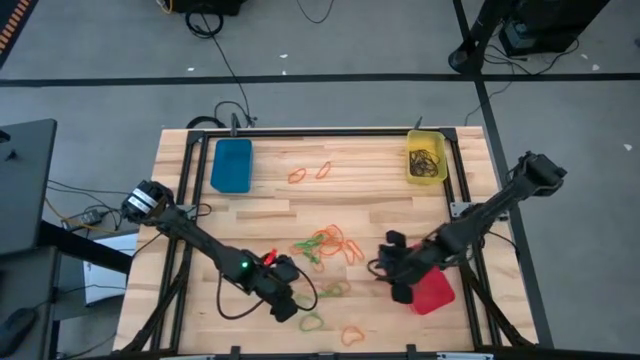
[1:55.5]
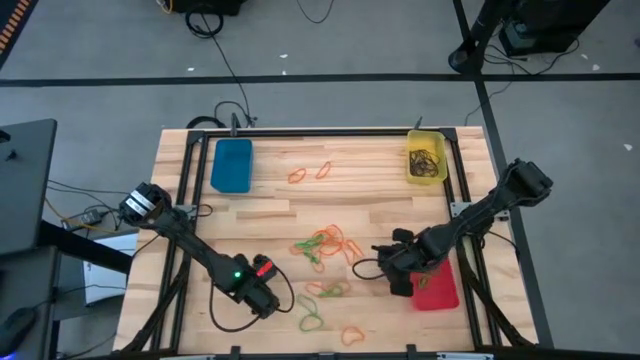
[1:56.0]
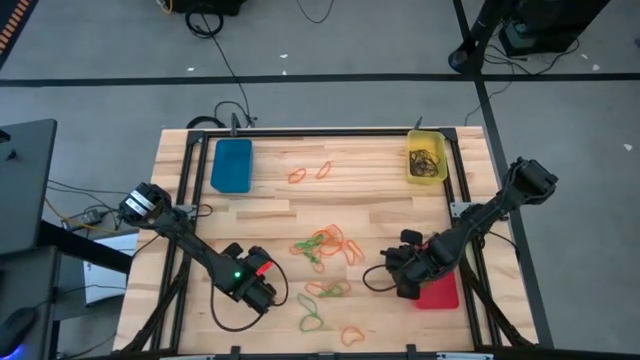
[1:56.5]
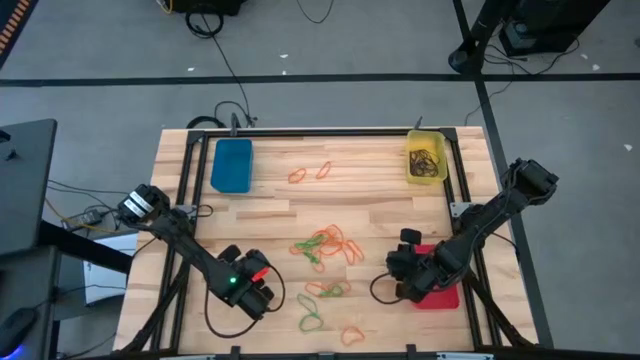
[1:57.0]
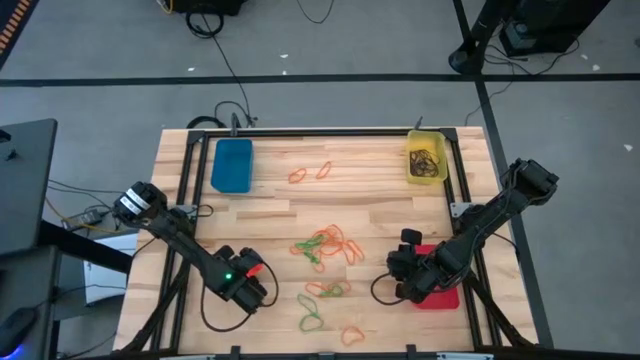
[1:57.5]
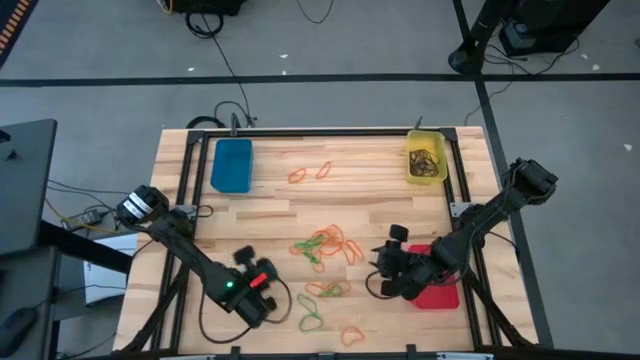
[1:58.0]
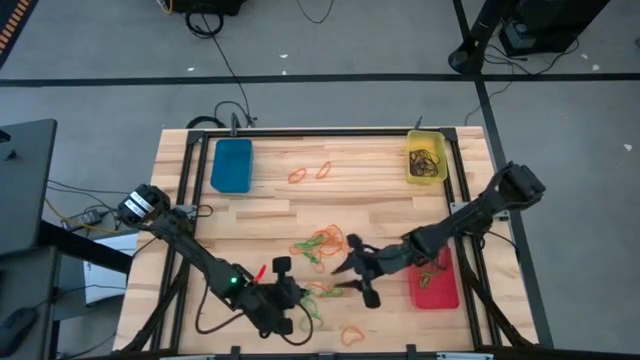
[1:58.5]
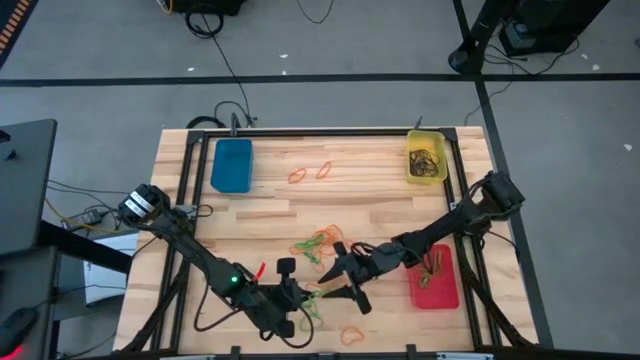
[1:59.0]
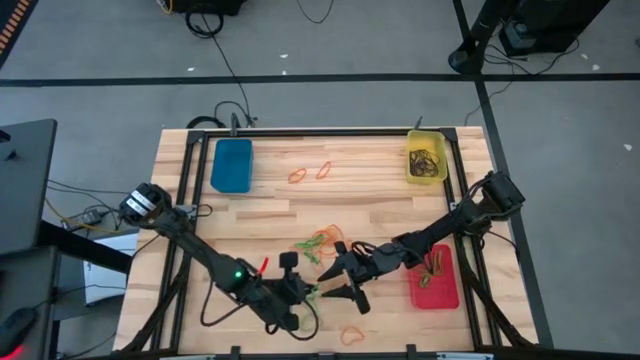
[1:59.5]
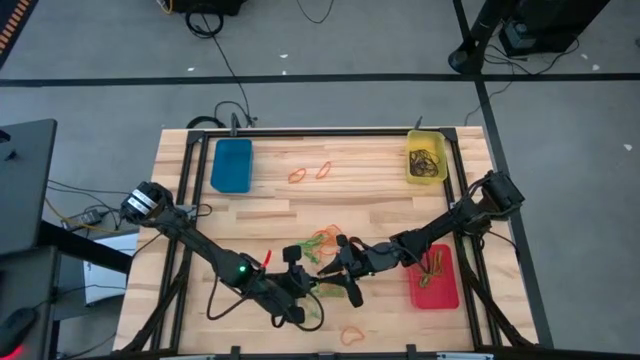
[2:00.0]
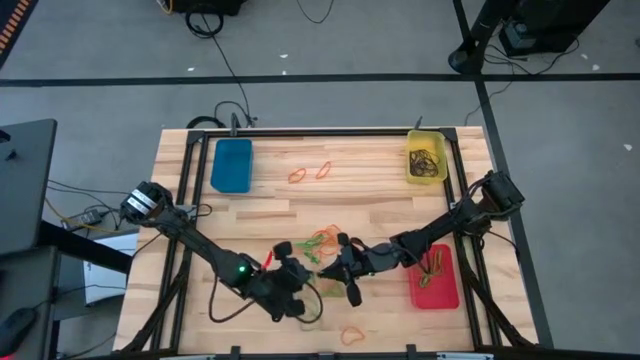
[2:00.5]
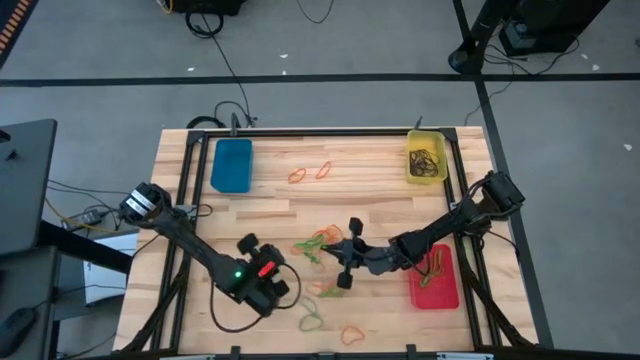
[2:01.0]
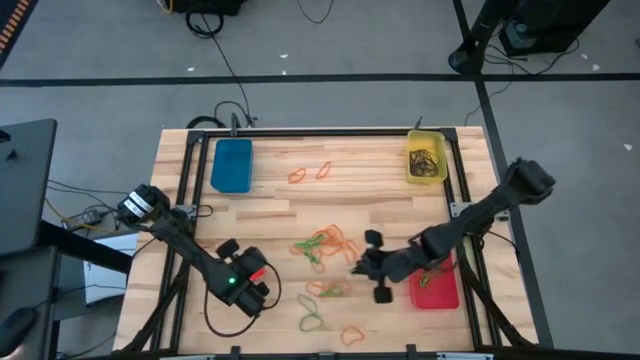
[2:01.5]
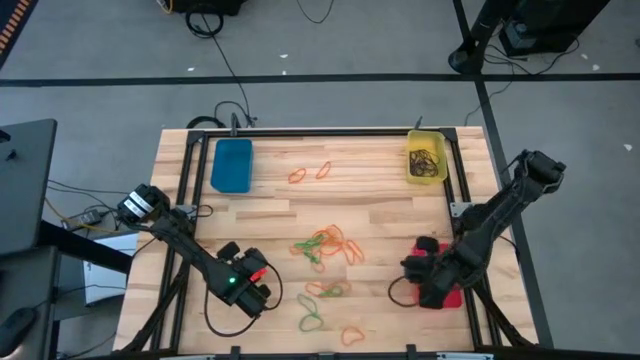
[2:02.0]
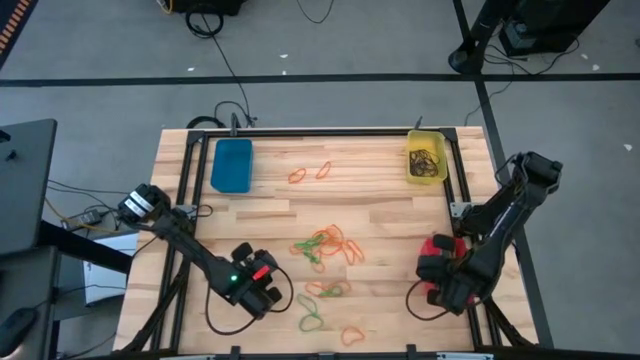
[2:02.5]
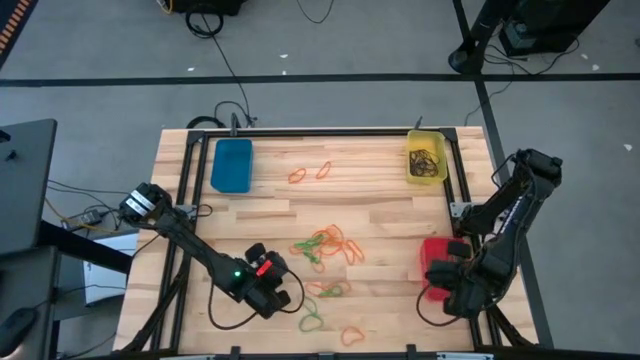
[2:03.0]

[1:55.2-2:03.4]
Task: Sort rubber bands into baskets
Put the green rubber band into the red bin

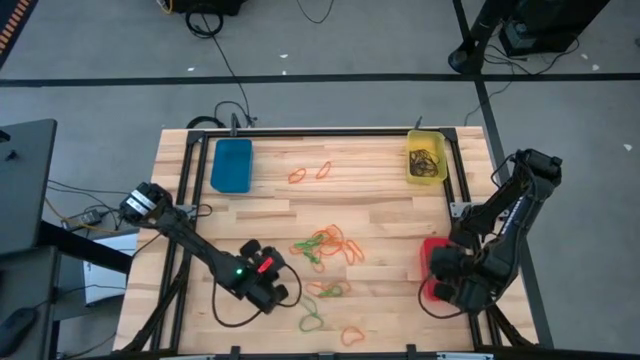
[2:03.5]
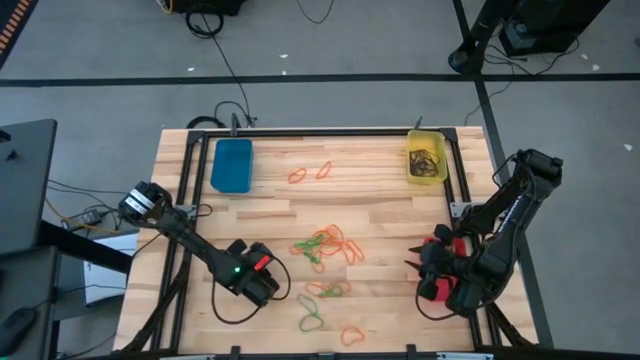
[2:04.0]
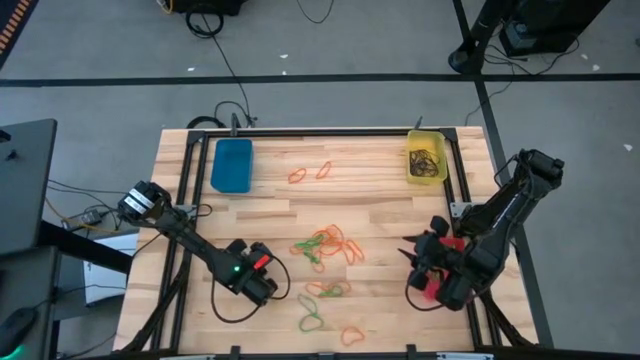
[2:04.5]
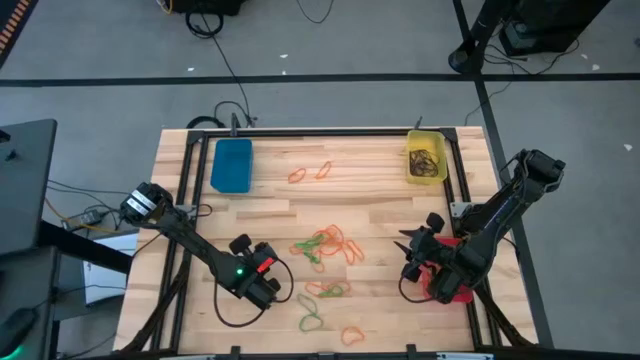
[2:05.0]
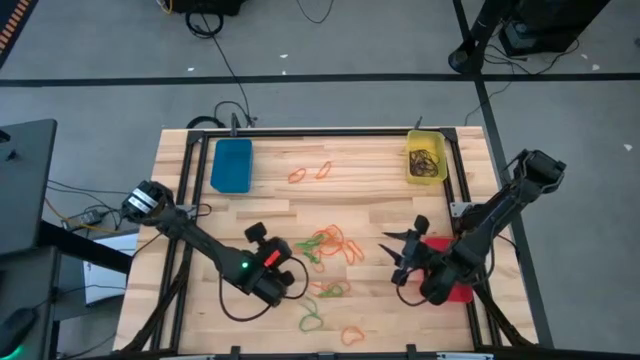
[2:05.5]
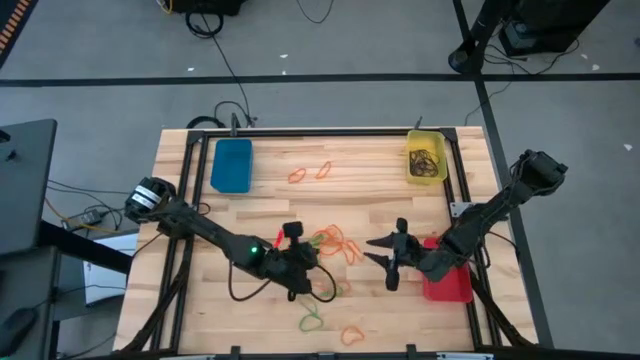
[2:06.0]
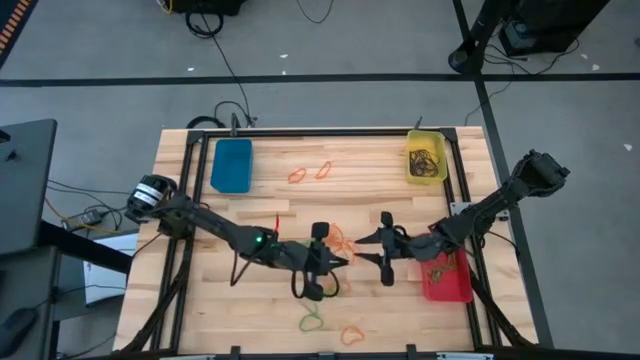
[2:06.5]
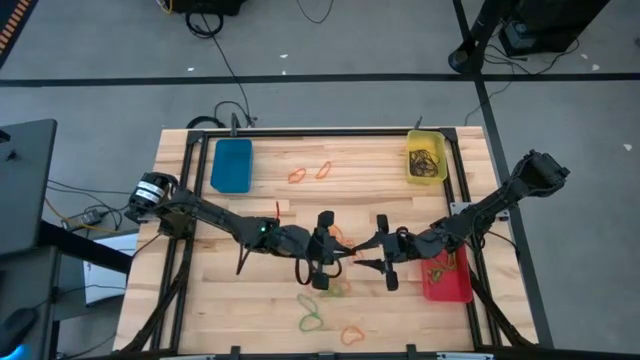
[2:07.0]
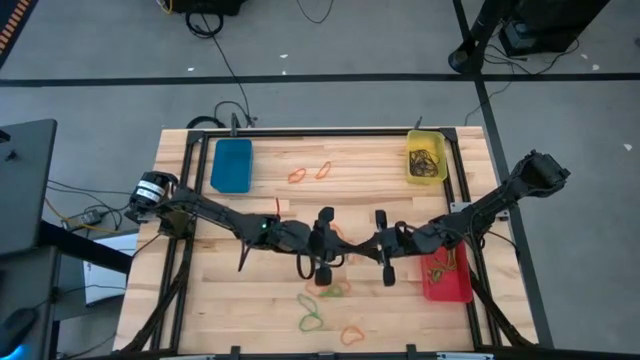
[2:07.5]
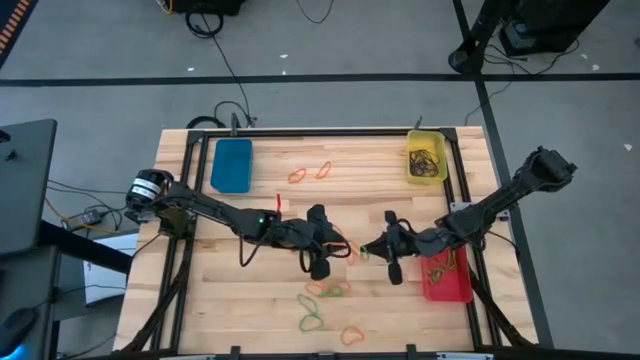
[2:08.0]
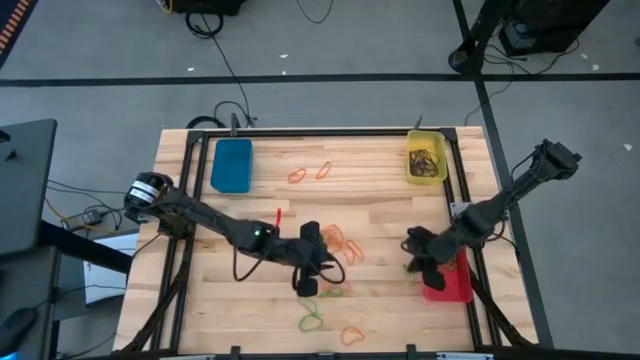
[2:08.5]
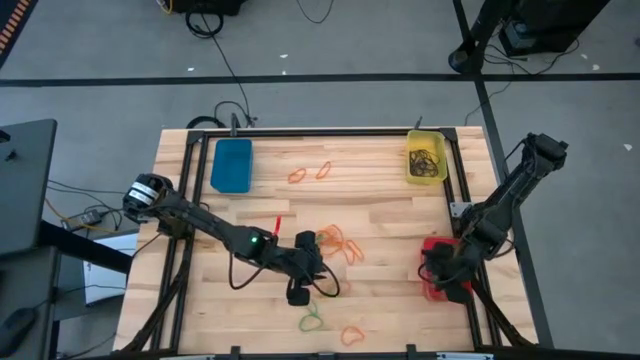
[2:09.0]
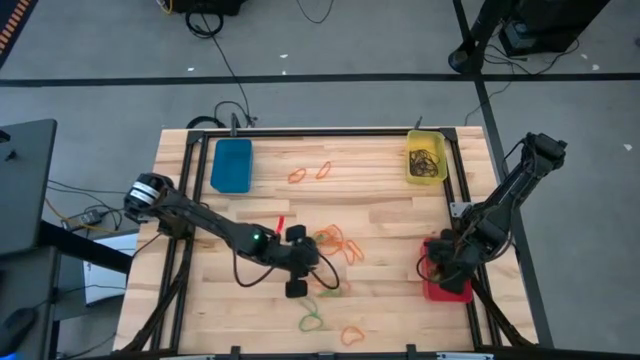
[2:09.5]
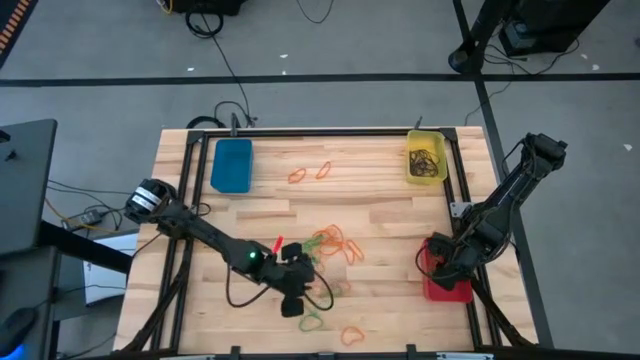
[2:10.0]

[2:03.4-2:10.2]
Put the green rubber band into the red bin

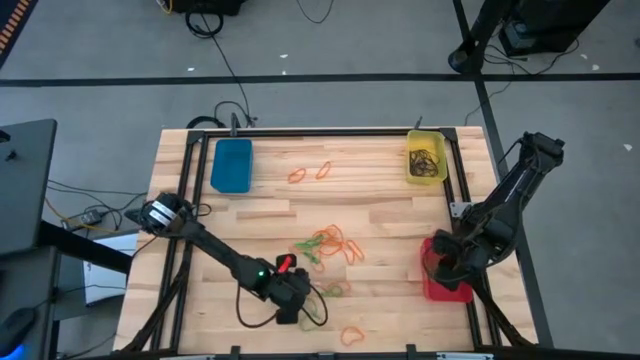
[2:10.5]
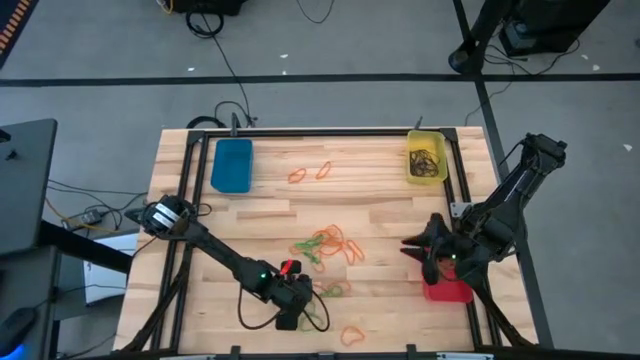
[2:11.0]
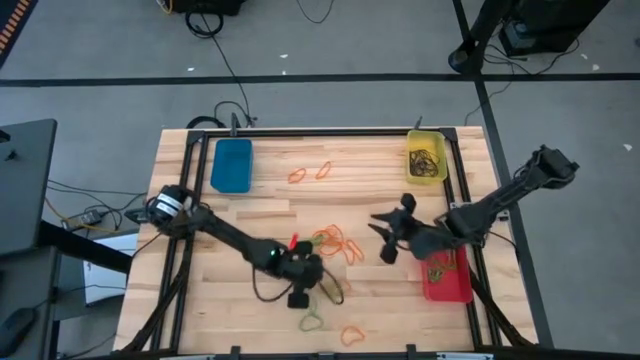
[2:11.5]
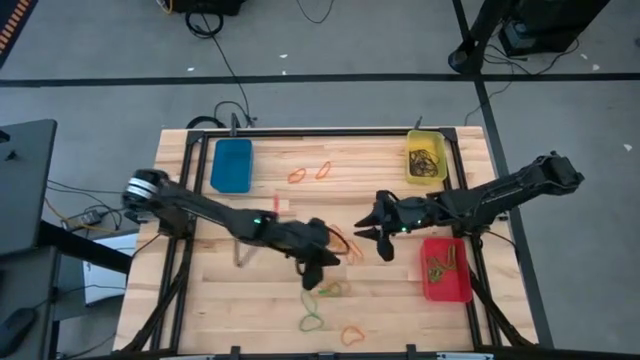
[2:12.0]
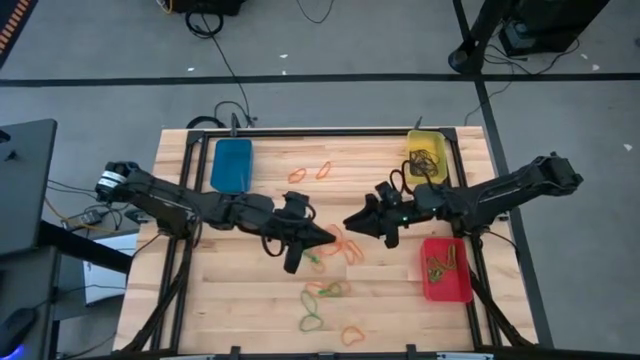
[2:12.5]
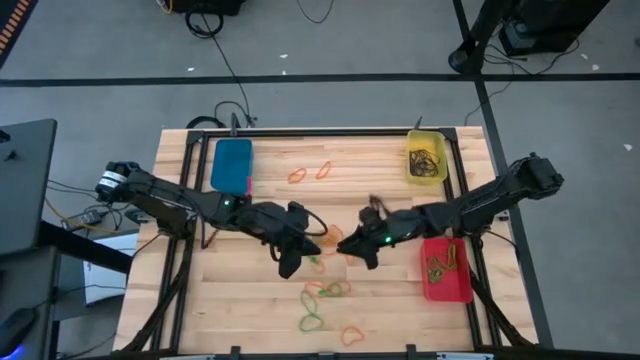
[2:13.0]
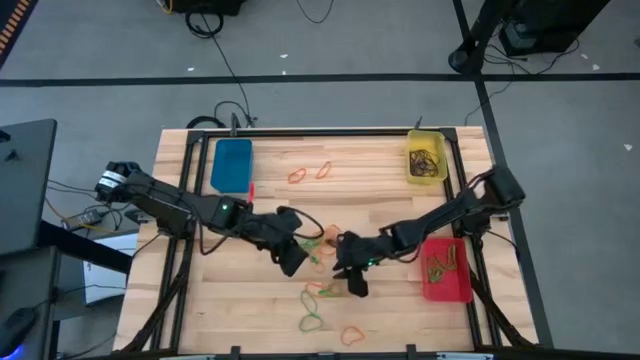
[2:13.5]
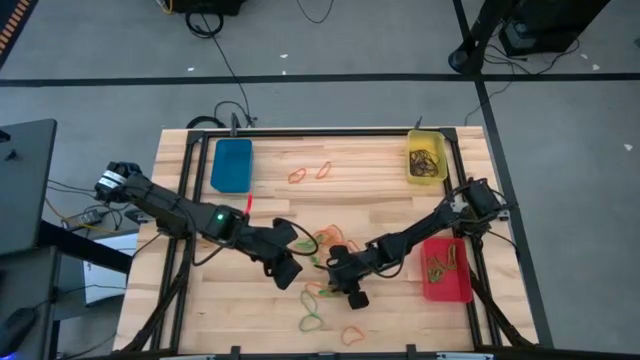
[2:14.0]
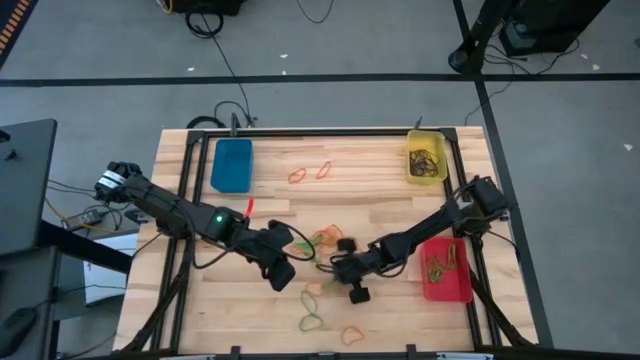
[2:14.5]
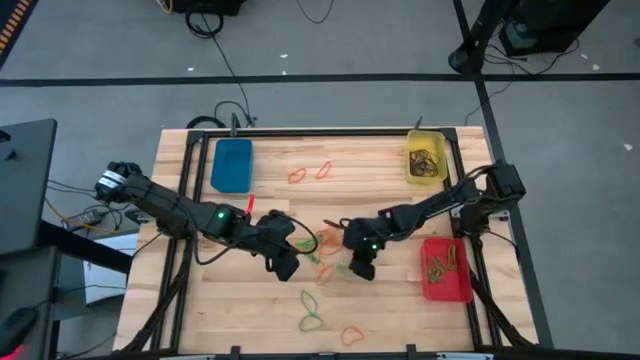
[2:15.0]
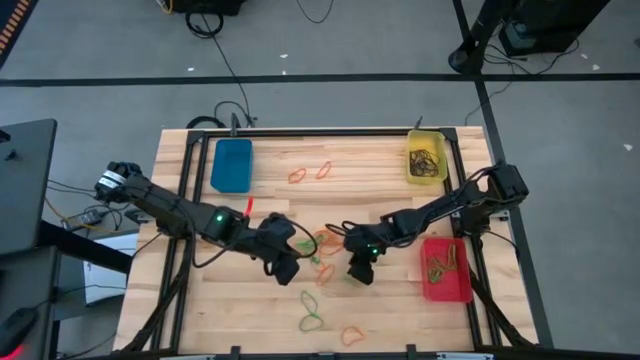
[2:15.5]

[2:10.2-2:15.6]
Put the green rubber band into the red bin

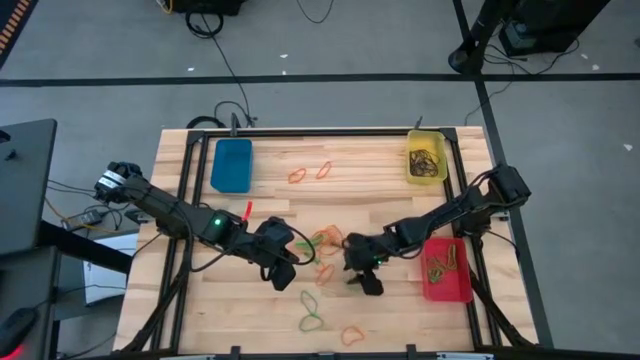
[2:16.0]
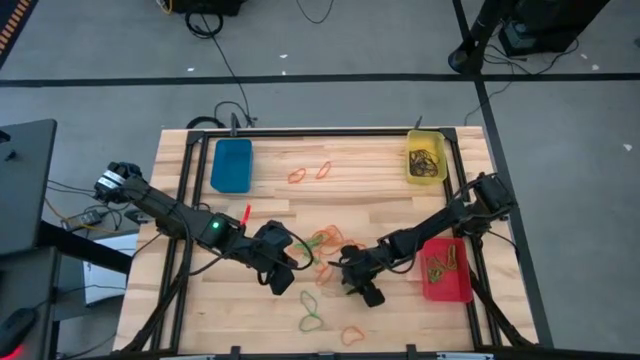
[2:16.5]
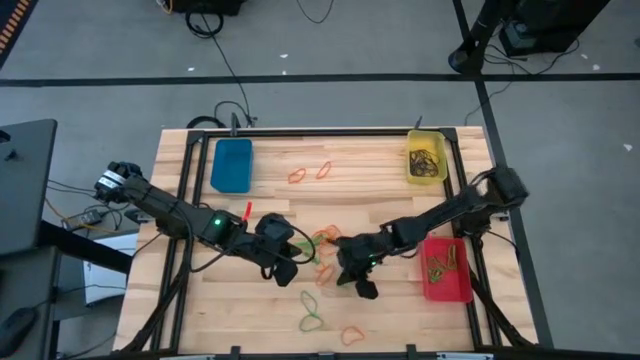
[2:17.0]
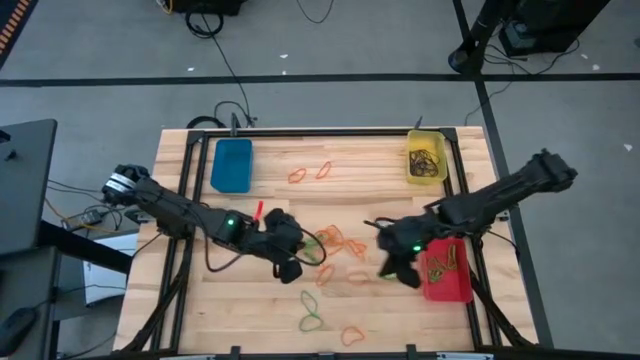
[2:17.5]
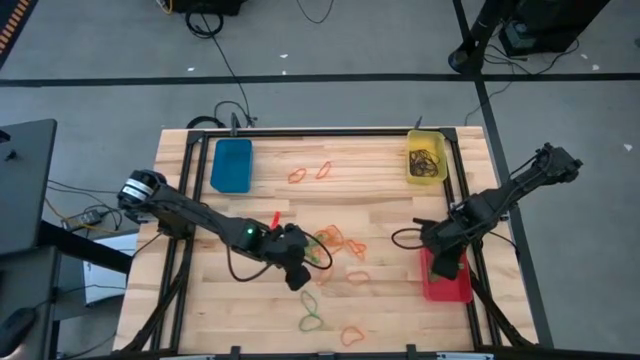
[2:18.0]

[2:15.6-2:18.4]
Put the green rubber band into the red bin
